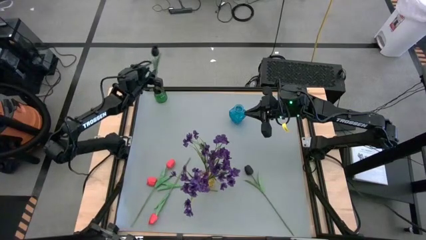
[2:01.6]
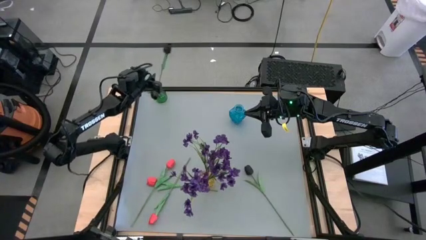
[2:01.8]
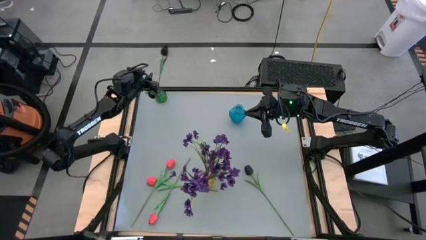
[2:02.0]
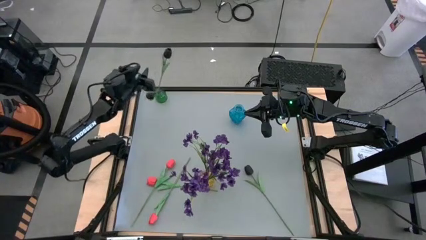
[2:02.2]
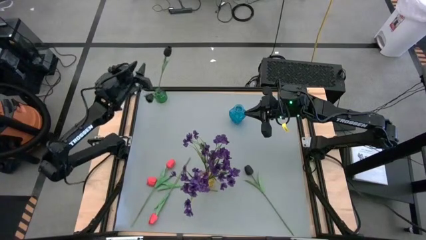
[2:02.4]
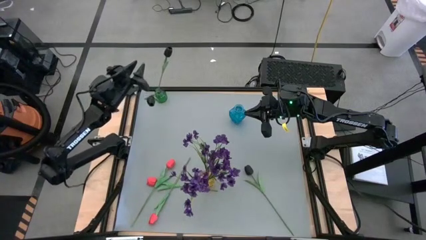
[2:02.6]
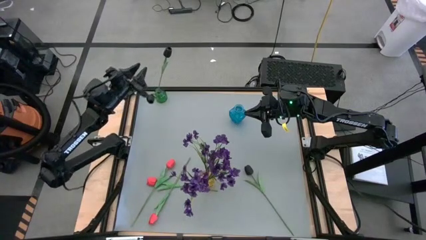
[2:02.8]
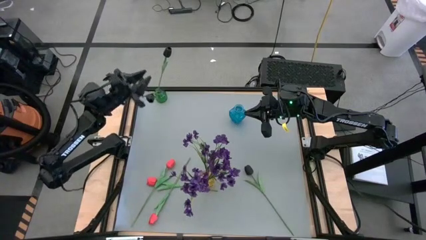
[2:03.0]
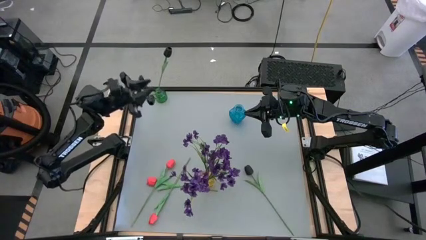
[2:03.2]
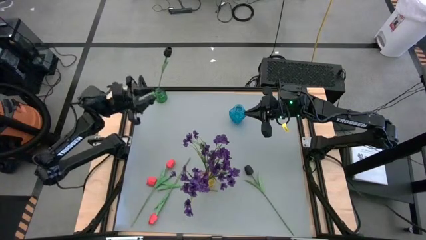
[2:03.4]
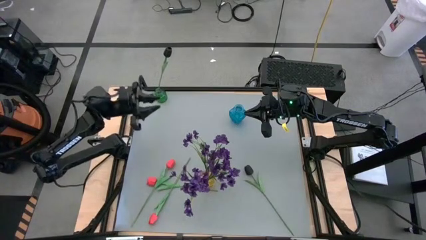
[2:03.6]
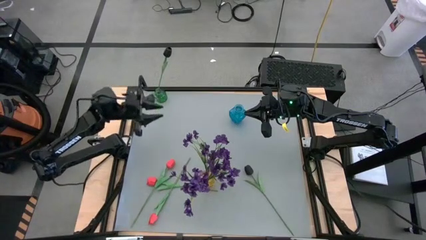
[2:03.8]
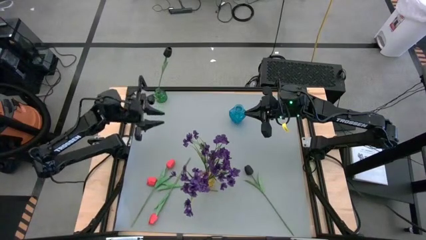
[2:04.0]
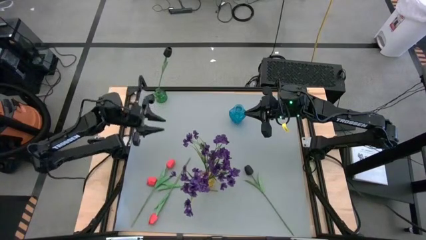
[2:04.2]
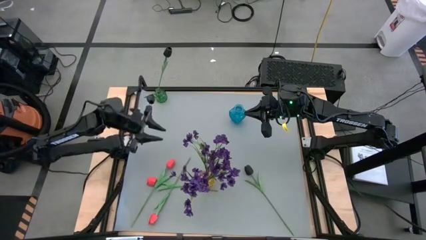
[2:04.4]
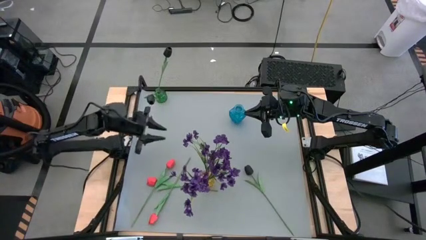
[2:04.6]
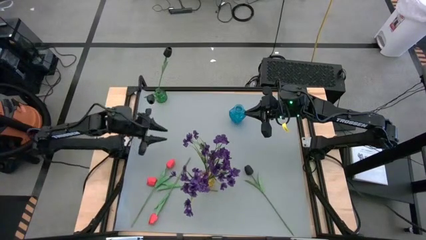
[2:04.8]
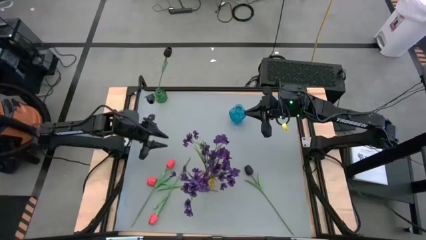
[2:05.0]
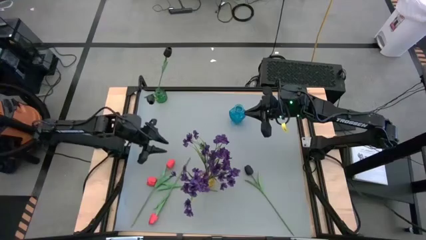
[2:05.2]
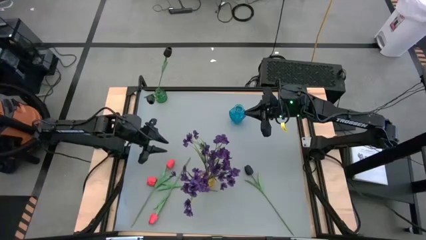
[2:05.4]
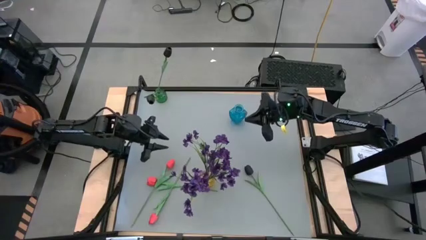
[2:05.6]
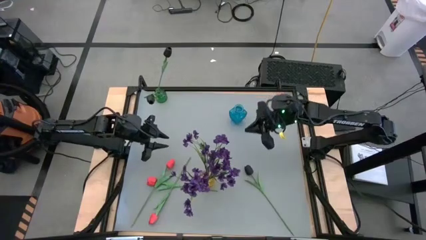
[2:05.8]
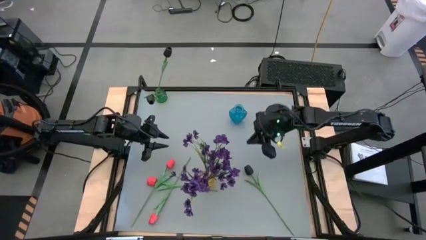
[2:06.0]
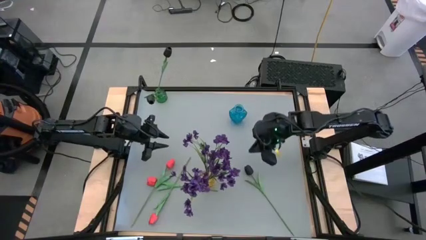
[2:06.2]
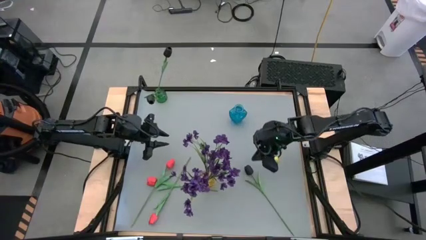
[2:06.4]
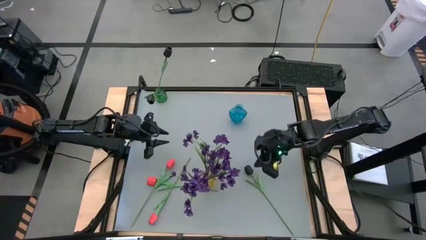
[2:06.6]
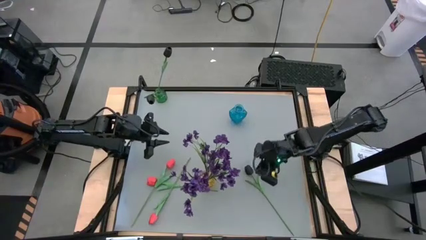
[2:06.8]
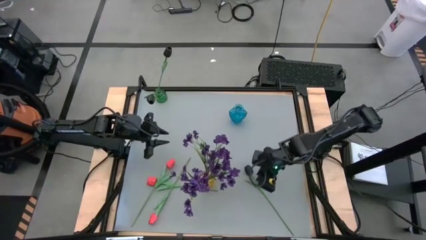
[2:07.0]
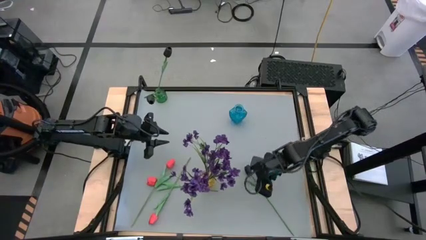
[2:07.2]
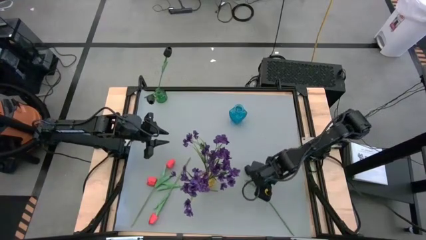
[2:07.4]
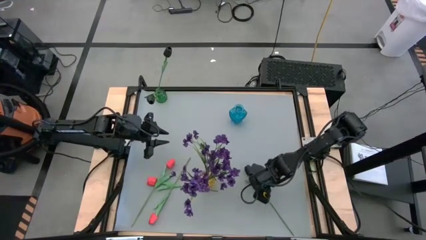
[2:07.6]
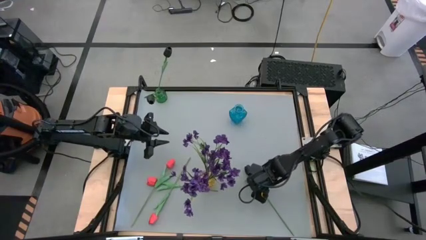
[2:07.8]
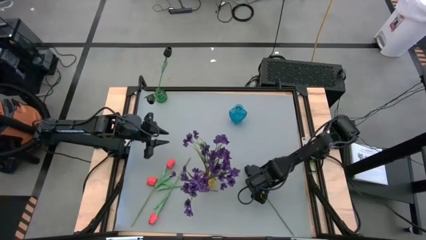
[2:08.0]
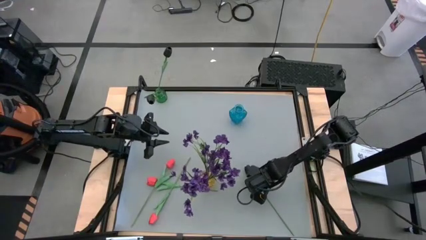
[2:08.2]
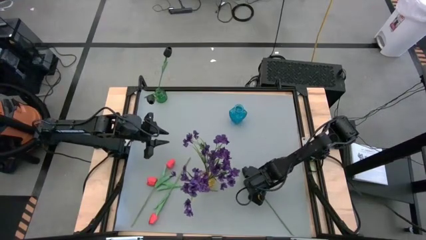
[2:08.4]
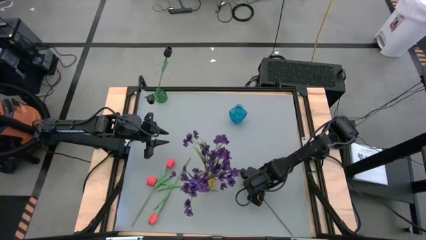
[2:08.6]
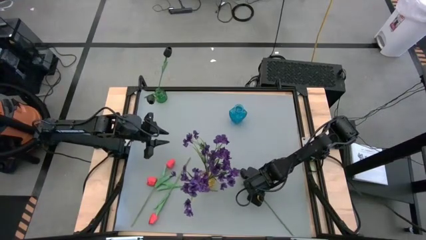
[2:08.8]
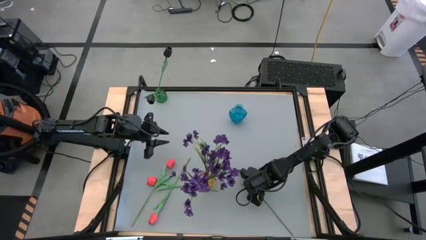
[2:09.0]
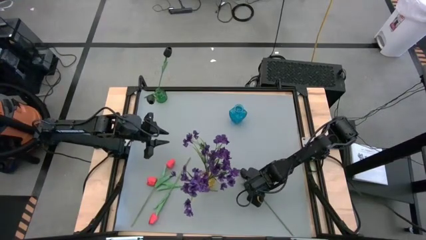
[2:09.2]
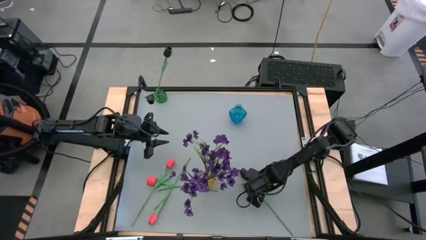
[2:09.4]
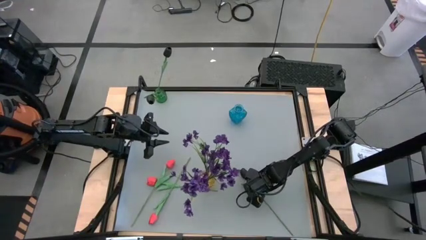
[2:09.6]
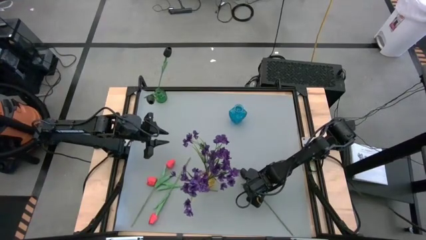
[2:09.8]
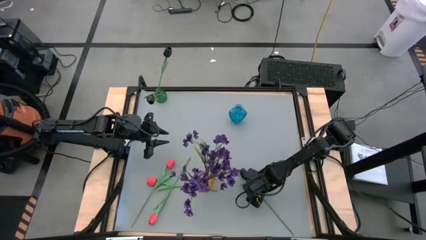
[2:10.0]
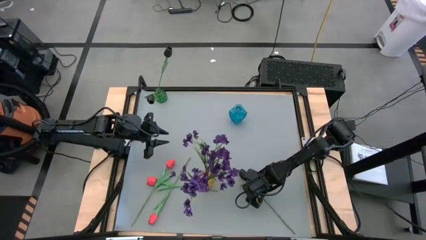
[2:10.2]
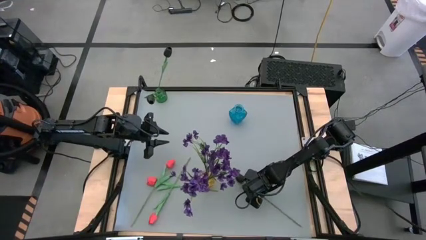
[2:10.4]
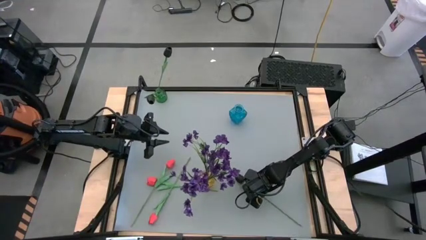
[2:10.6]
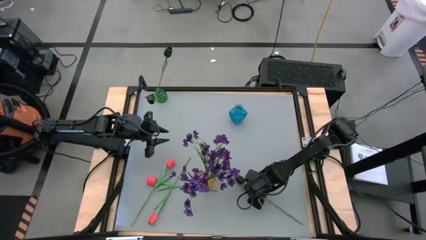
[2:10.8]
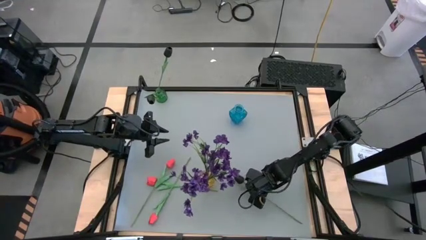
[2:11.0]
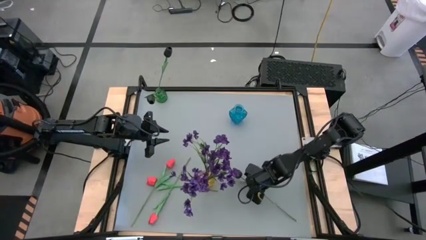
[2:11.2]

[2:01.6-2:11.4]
Task: Sort flowers into vase by color
Put the black flower into the green vase

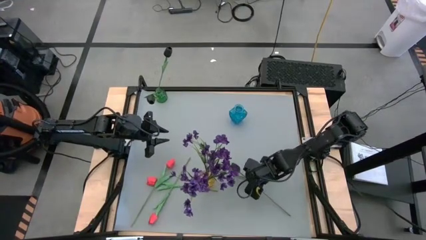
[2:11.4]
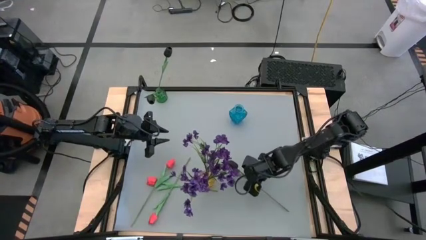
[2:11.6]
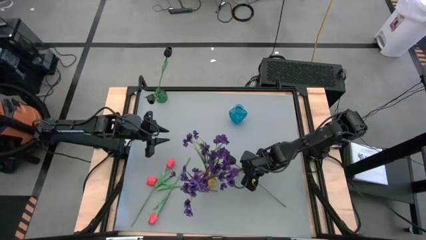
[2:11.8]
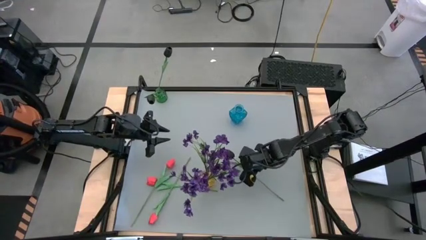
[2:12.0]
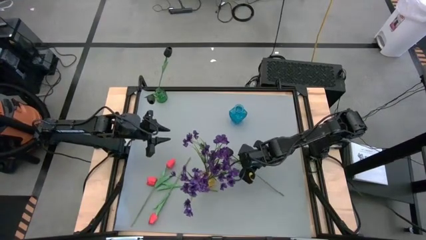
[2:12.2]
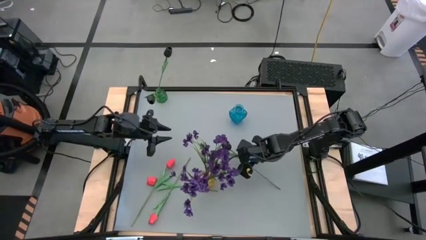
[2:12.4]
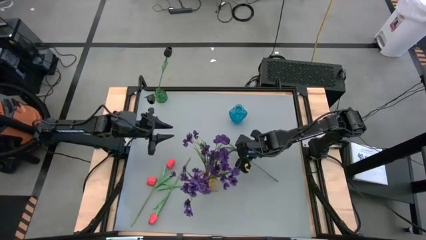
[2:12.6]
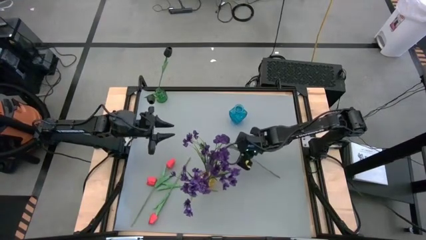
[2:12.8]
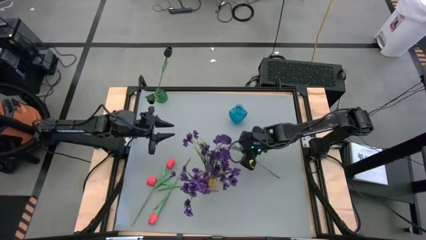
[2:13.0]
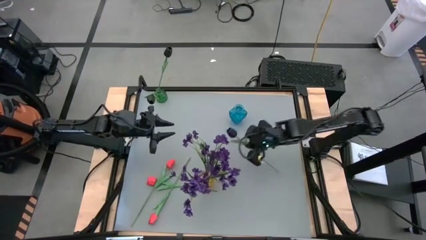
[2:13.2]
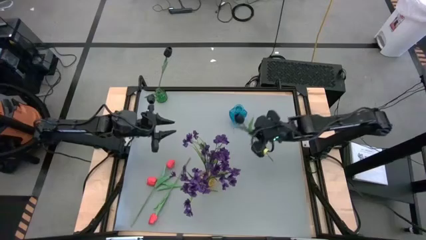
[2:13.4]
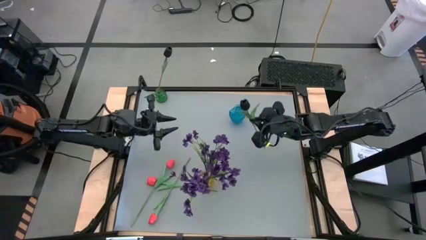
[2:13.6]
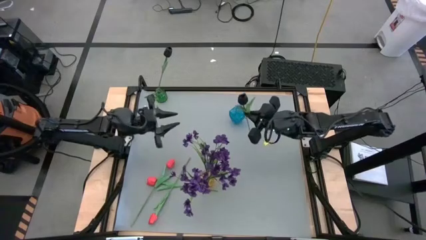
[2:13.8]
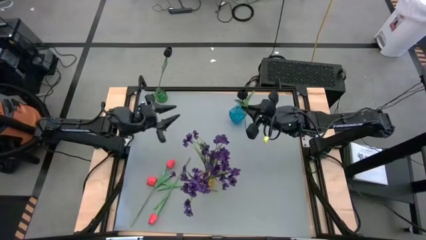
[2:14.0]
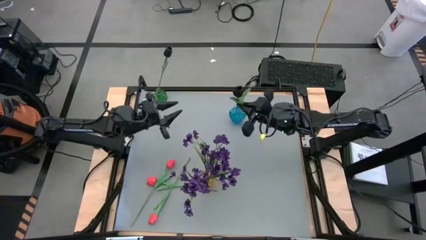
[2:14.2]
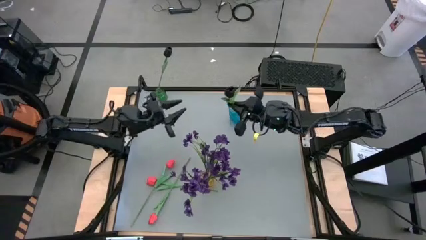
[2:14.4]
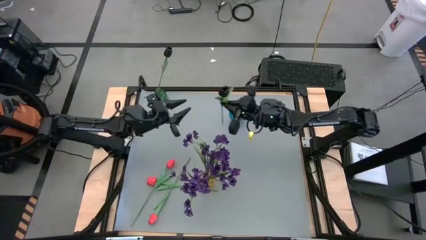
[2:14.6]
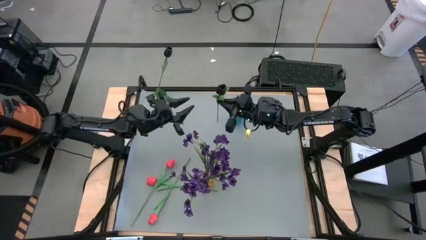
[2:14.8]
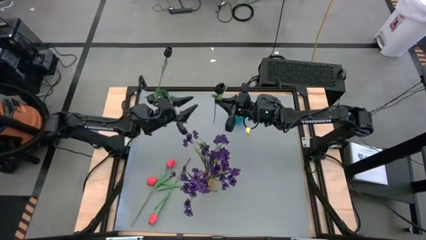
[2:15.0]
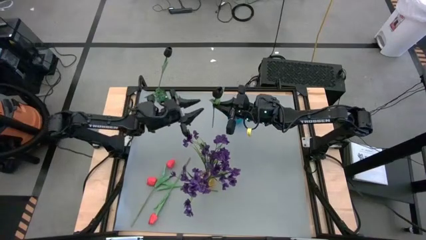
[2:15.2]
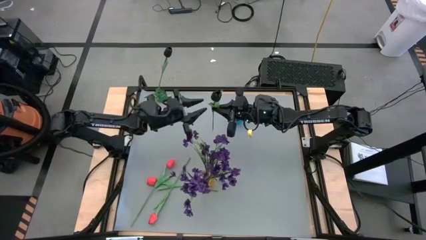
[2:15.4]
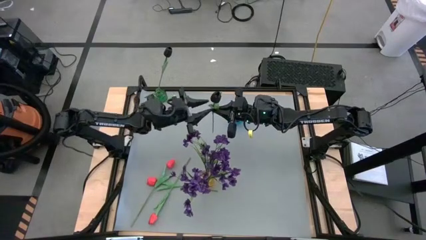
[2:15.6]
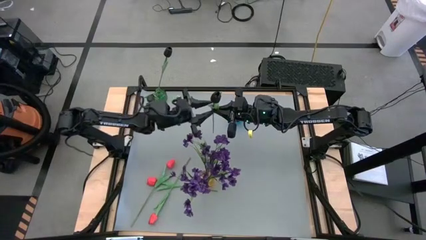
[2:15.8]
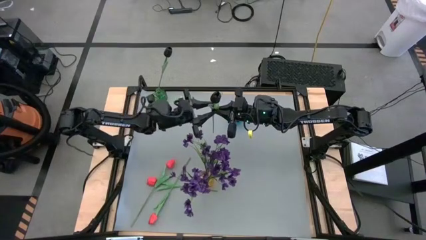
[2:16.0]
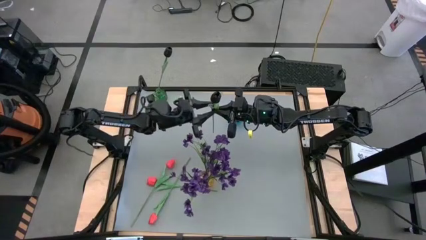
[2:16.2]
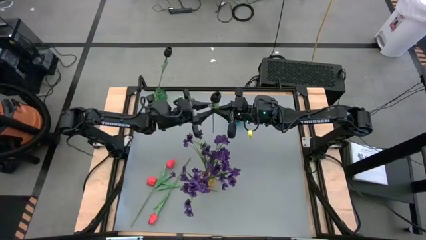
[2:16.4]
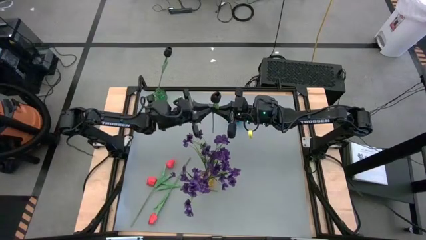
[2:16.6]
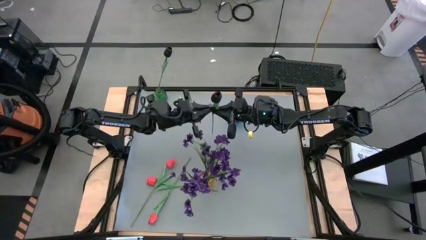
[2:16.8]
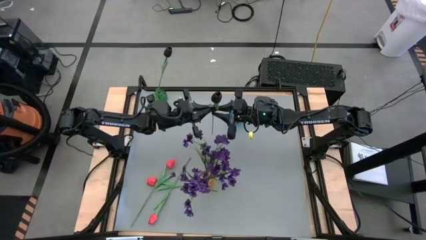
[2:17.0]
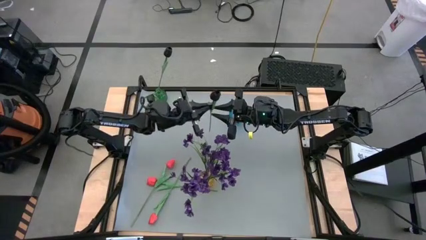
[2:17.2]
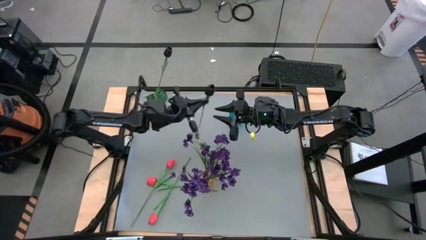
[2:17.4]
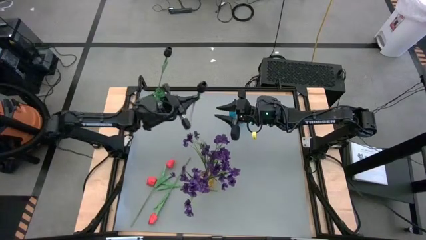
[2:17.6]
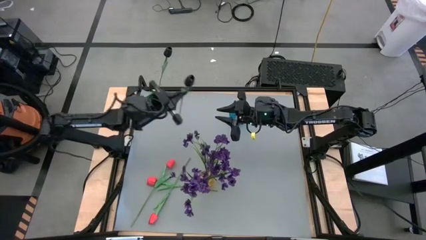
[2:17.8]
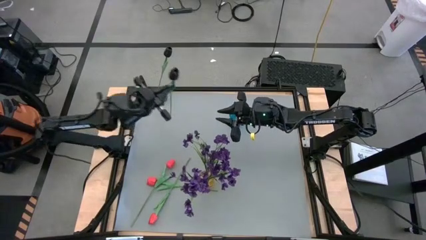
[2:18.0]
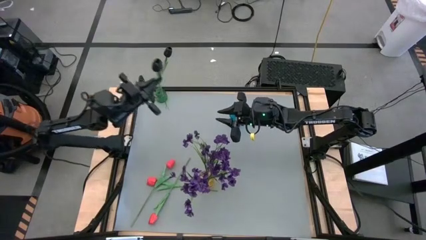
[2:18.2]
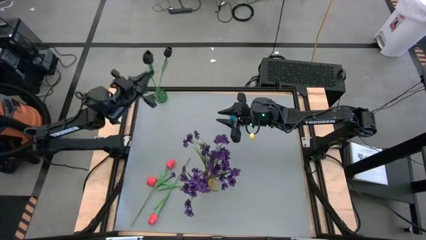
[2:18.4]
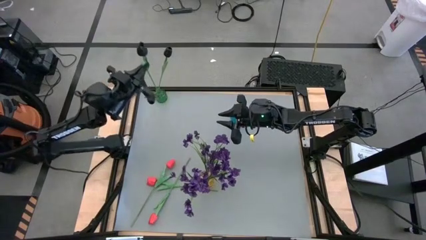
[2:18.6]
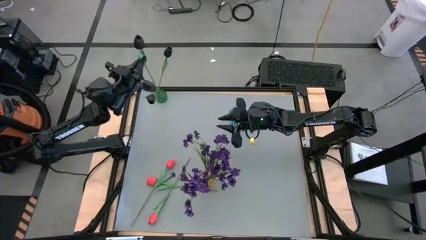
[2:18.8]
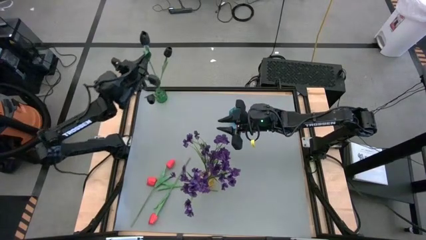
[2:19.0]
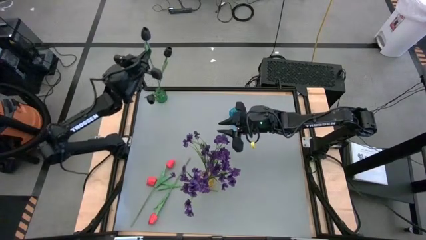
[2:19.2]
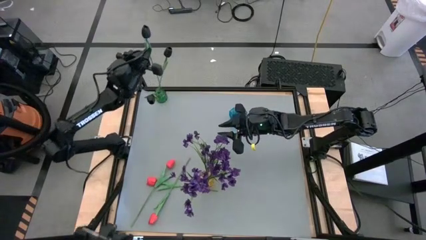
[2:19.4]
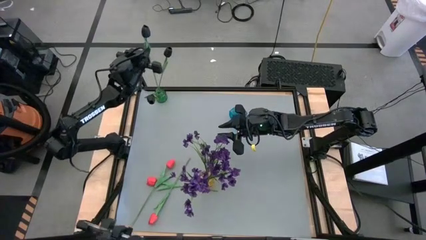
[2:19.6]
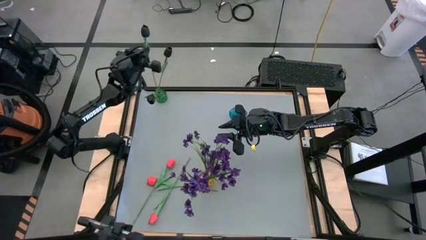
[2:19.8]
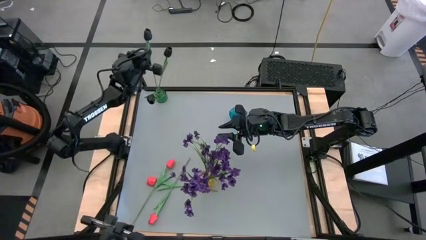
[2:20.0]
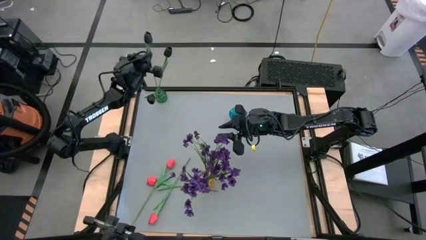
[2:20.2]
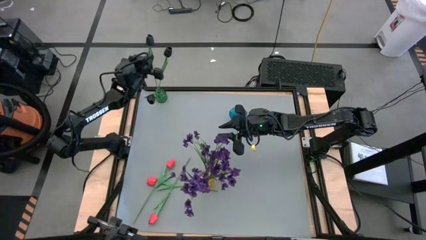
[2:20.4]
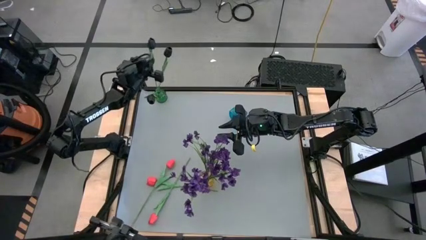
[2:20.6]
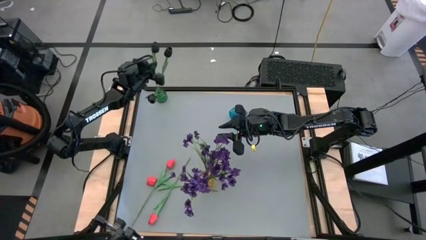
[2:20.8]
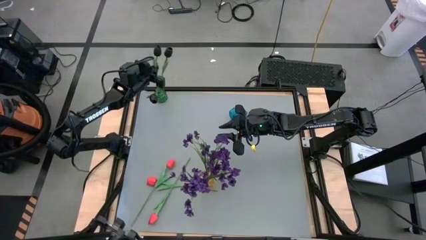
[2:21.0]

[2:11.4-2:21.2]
Put the black flower into the green vase
